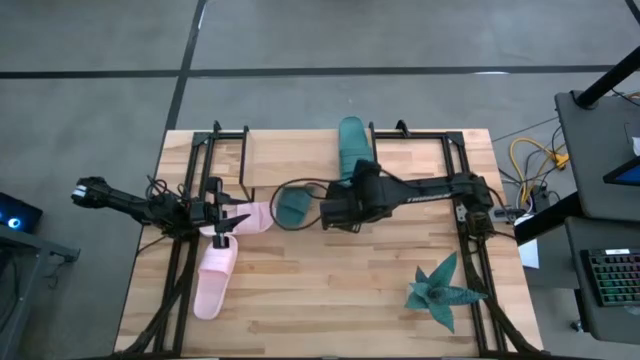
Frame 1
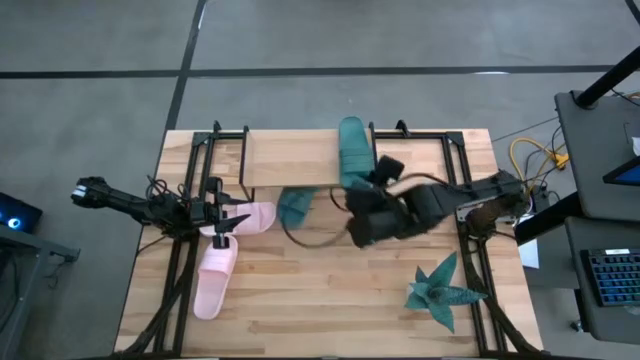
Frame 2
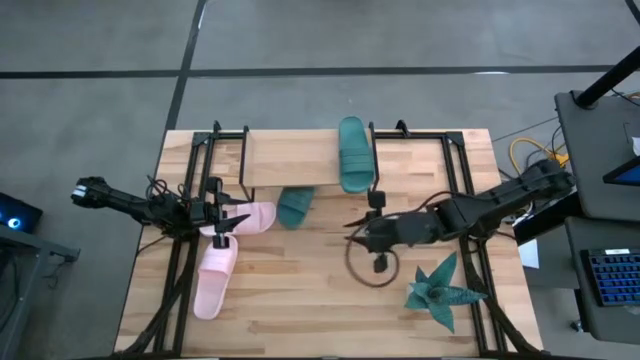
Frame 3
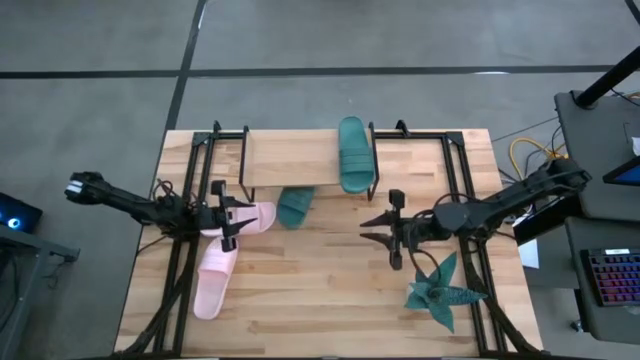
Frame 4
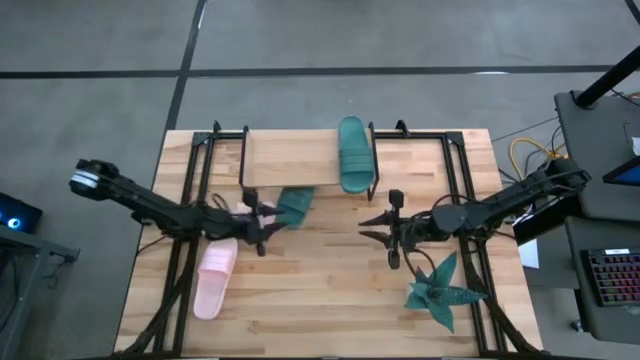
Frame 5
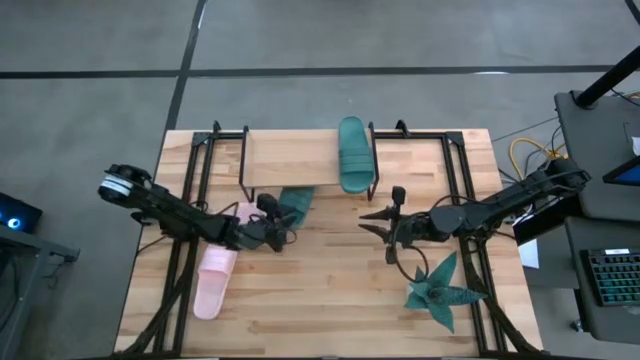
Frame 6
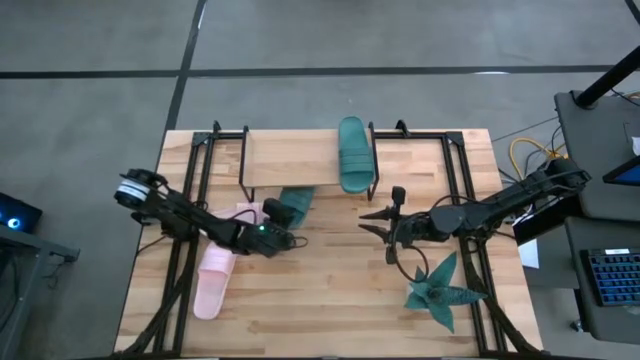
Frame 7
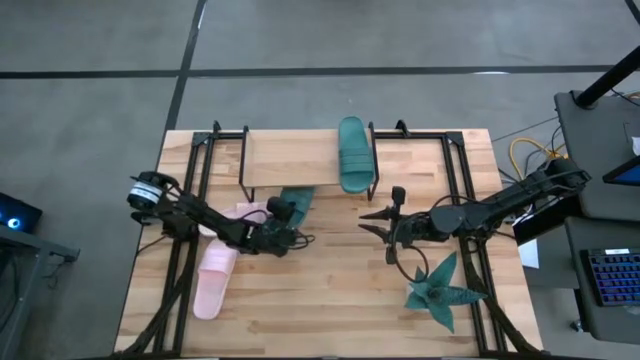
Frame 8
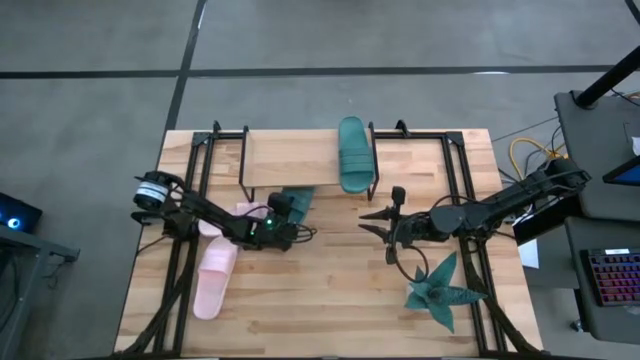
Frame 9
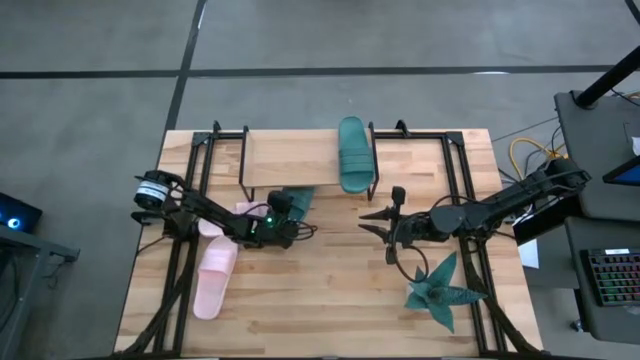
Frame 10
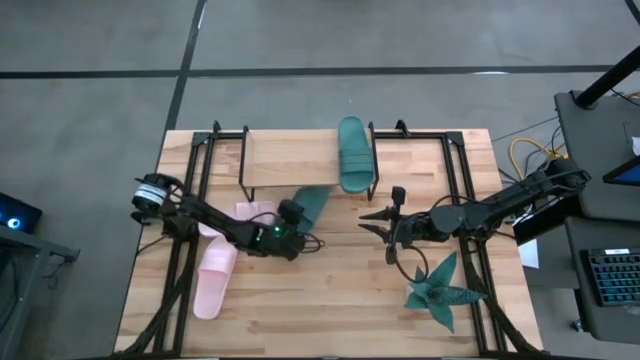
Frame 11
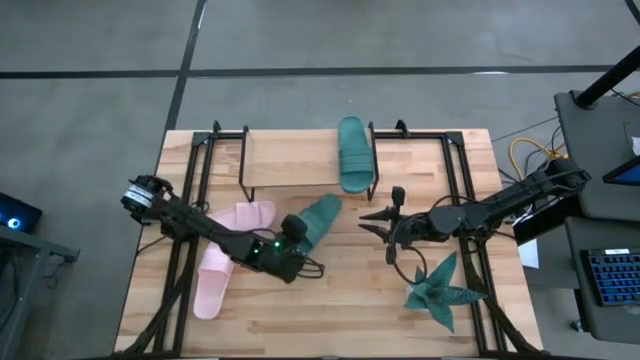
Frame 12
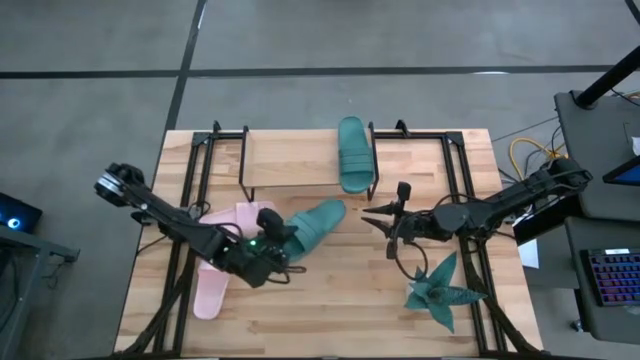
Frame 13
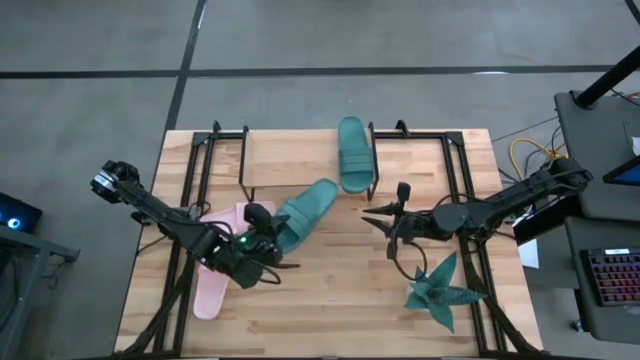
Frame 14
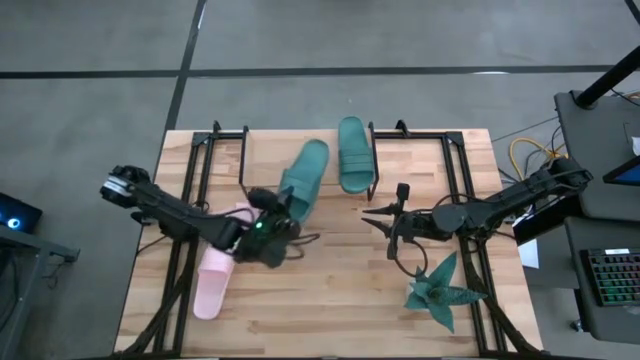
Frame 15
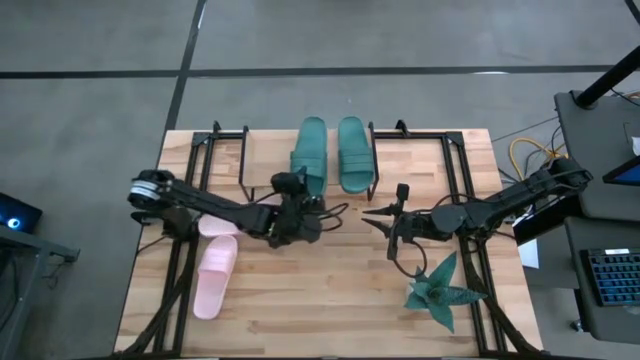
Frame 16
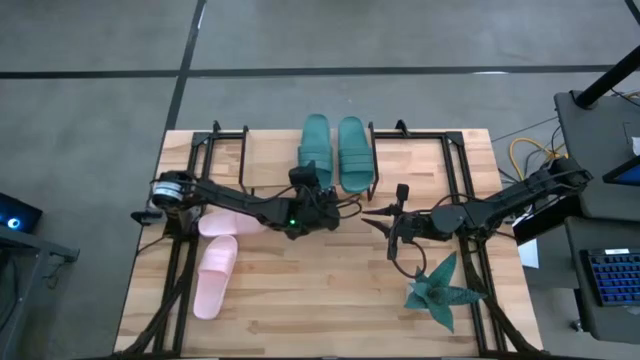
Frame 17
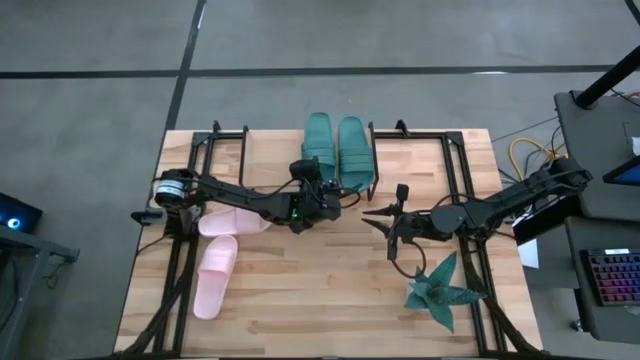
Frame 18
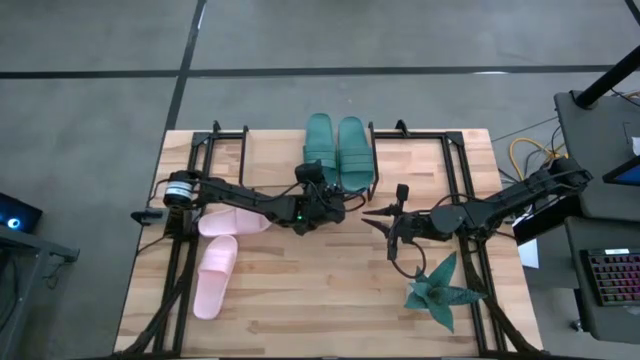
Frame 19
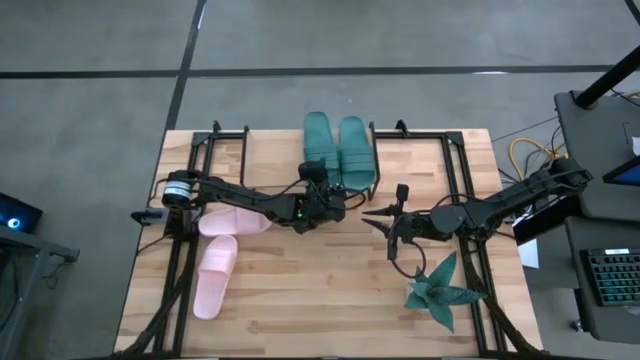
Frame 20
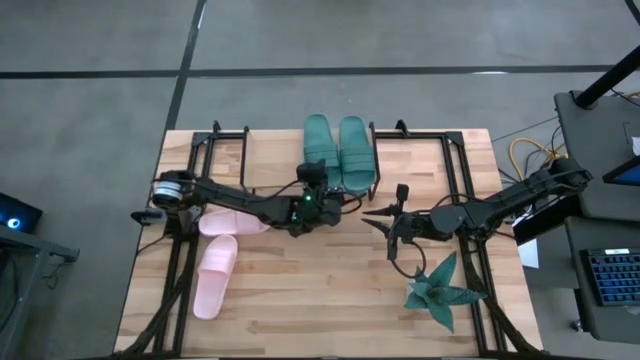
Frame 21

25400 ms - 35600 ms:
Task: Pick and place slides into the shelf
Put the green slipper on the shelf

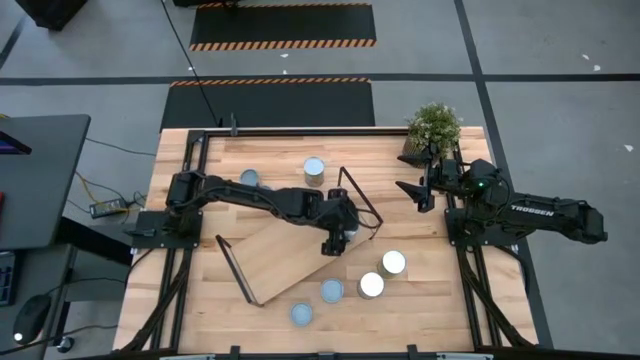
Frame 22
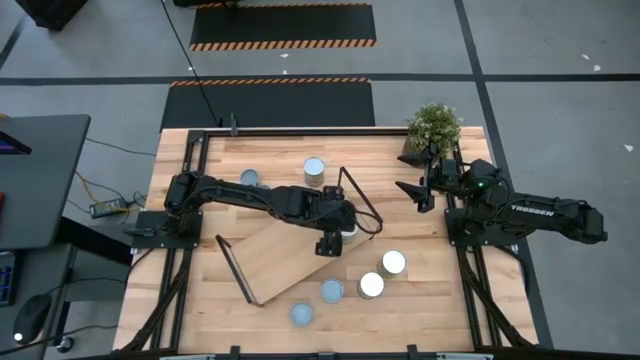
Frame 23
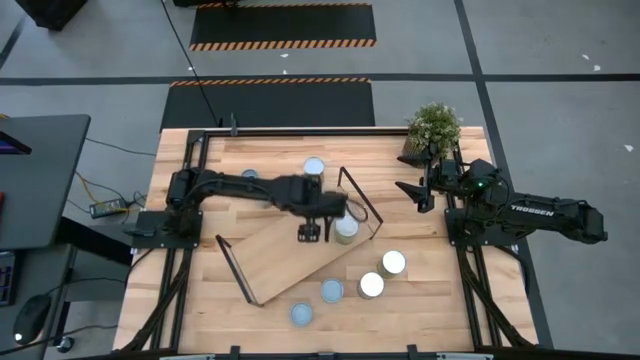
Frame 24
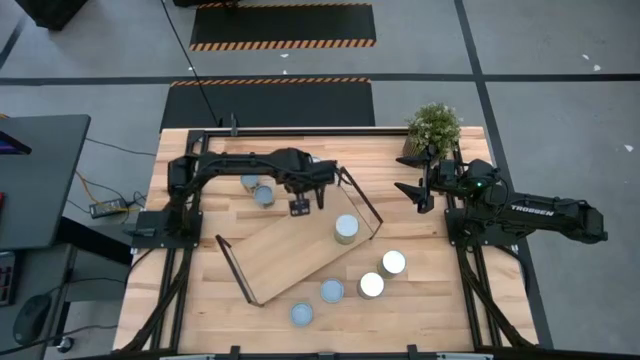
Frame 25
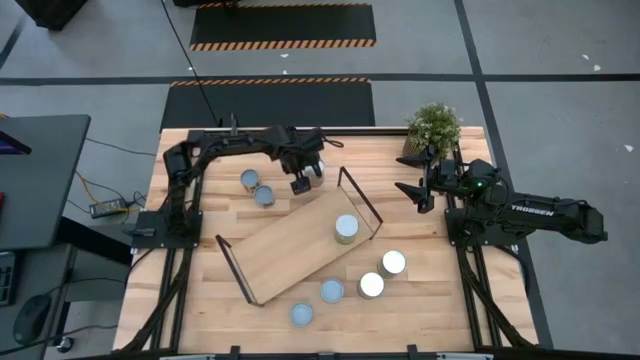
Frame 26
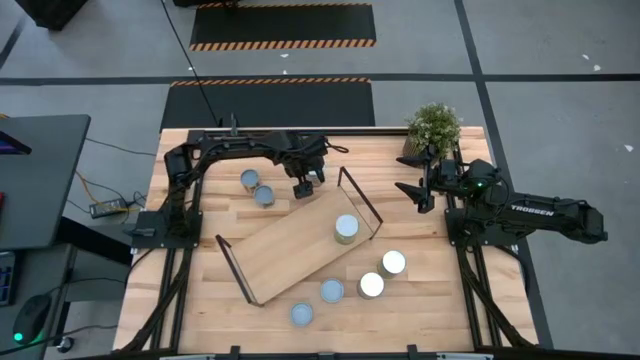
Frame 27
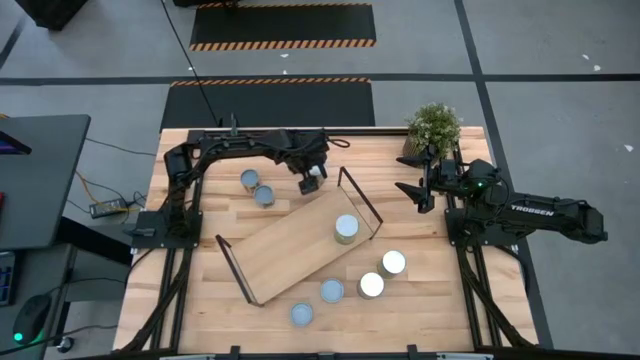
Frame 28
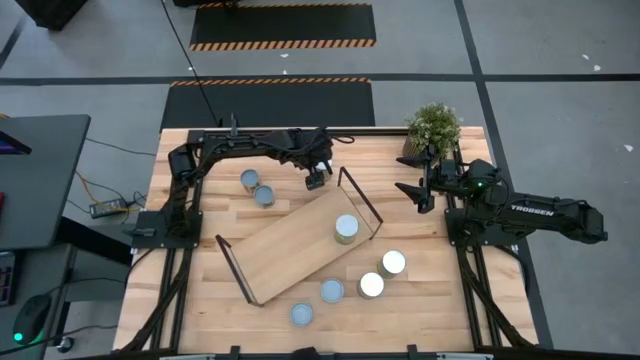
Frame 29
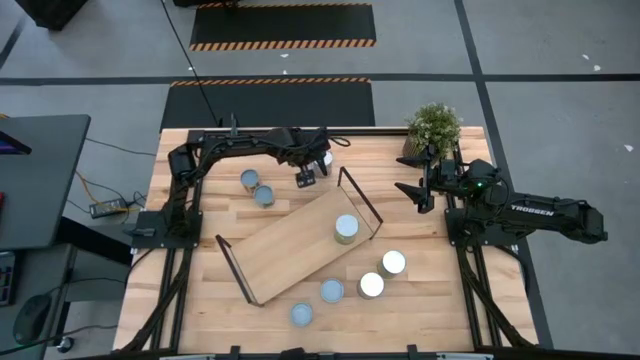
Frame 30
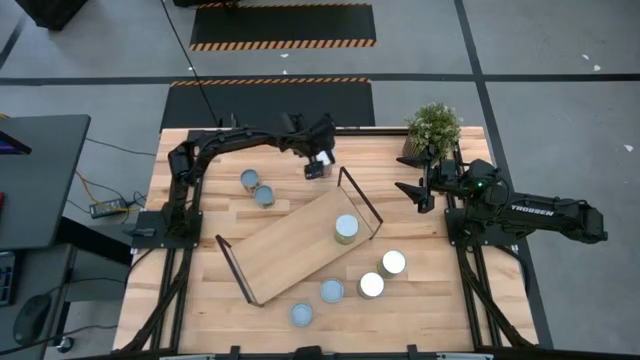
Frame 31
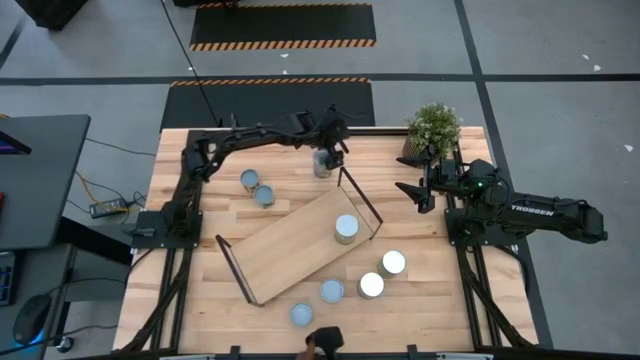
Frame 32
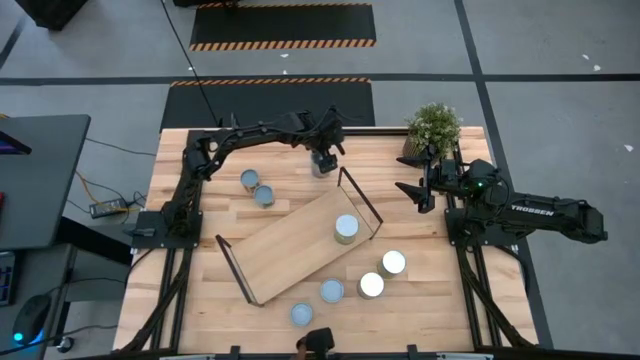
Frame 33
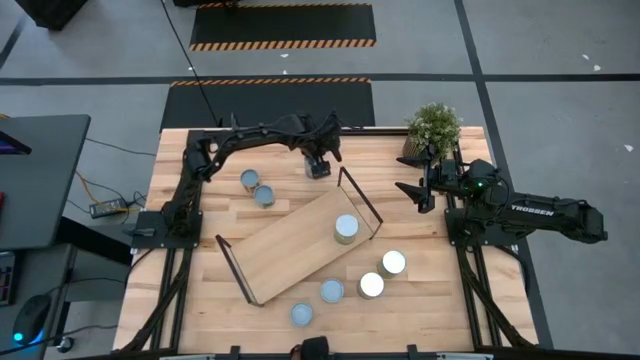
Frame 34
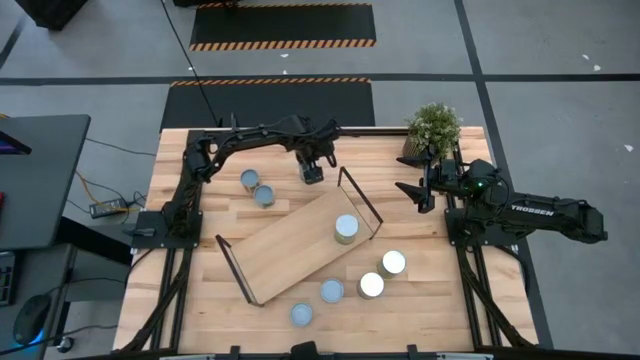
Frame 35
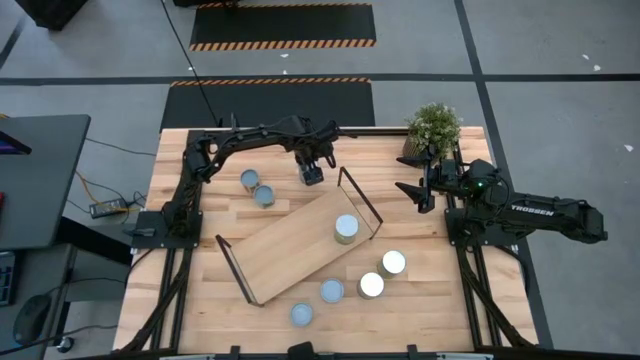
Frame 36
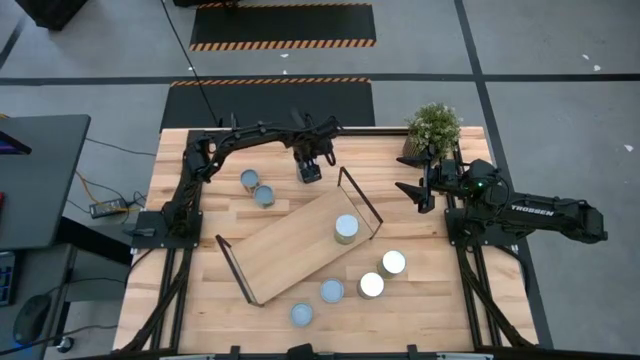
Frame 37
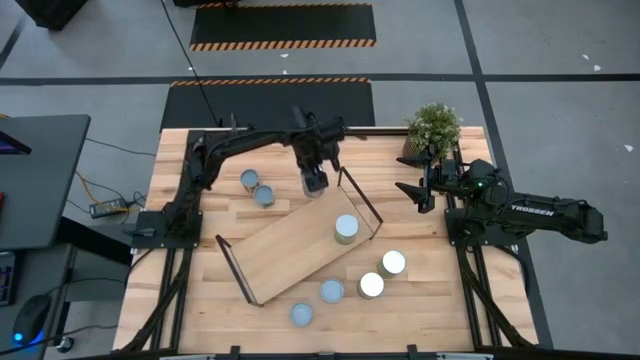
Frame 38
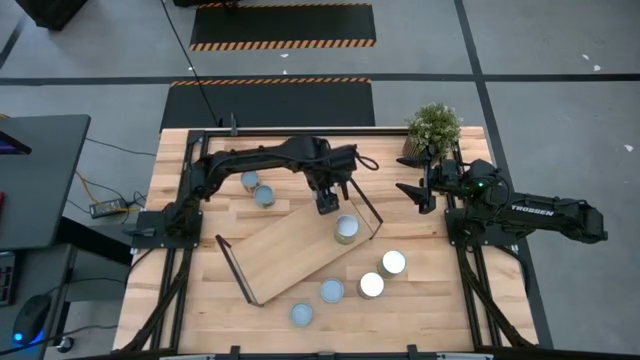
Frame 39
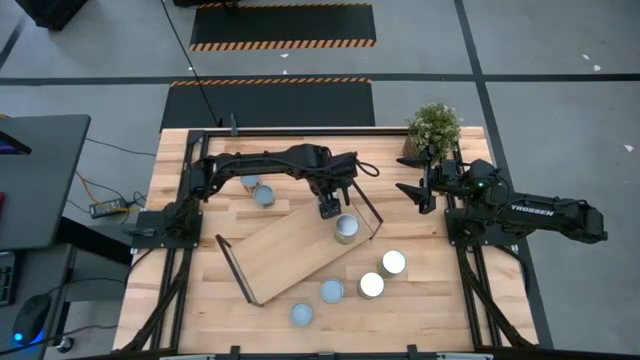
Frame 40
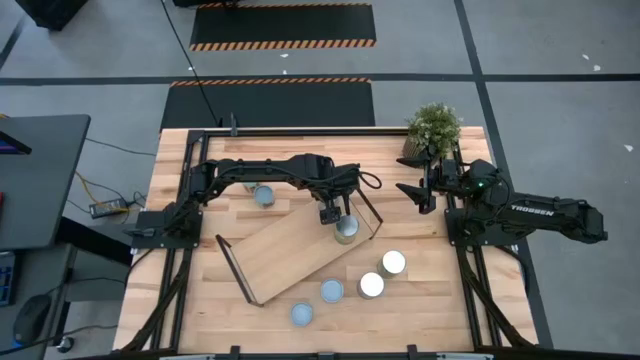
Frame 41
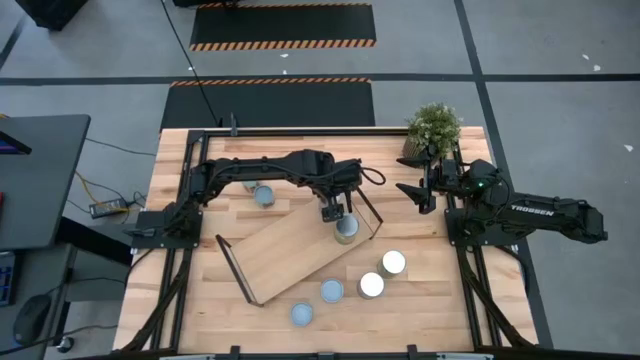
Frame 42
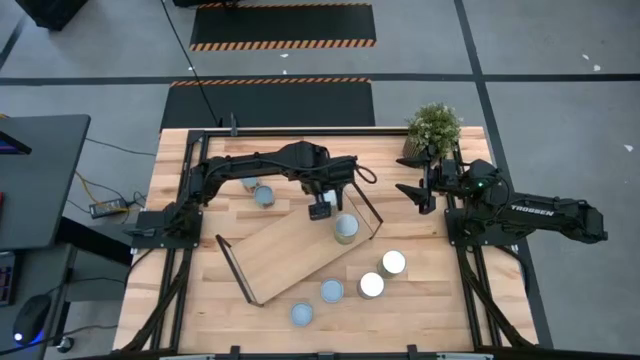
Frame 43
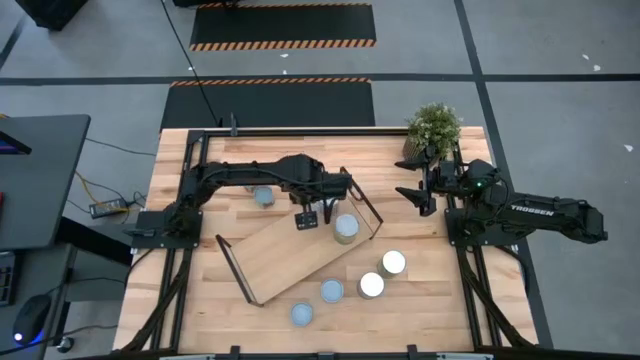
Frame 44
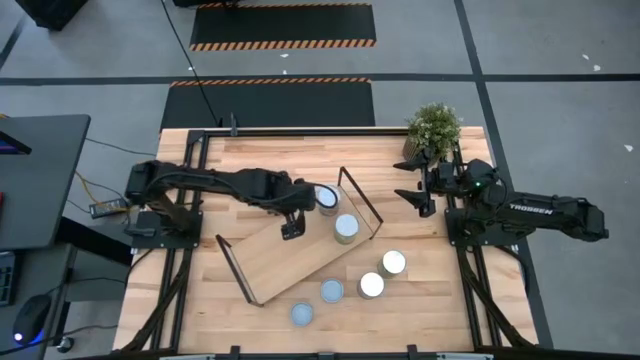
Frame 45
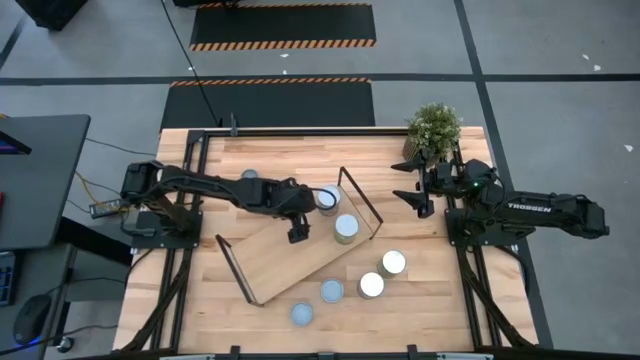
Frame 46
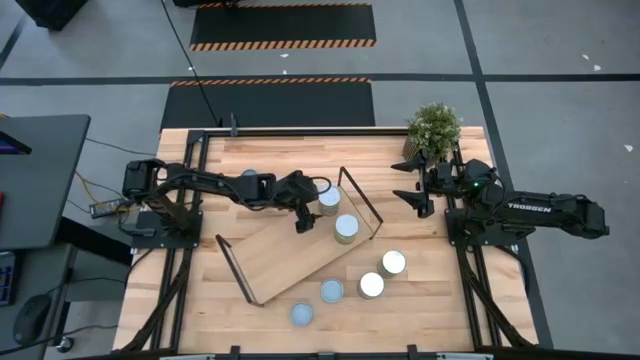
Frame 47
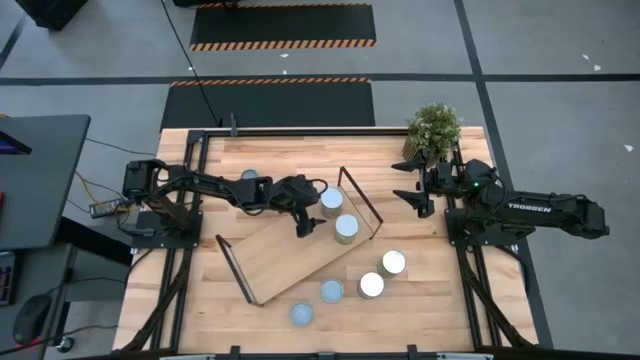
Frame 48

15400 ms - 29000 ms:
Task: Pick and place cans onto a shelf
Put the canned peaches on the shelf
